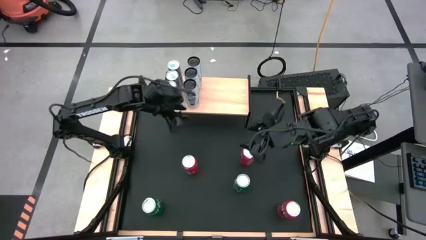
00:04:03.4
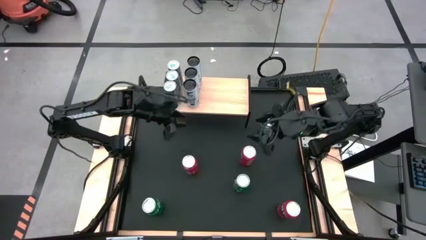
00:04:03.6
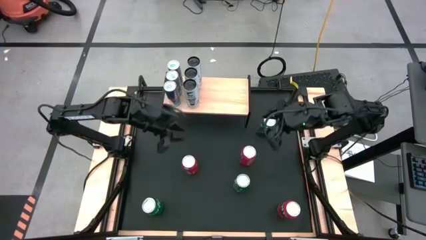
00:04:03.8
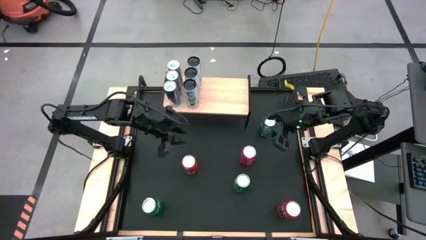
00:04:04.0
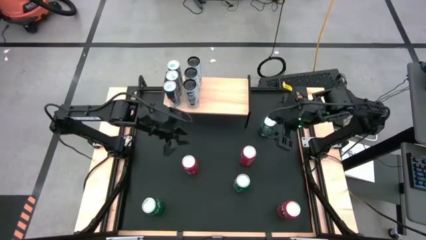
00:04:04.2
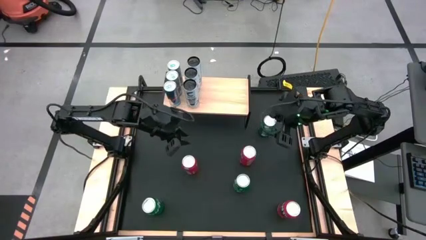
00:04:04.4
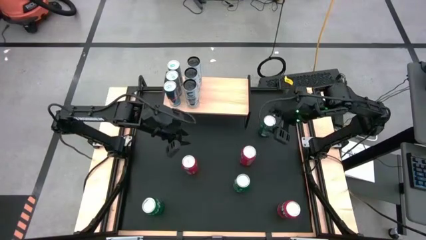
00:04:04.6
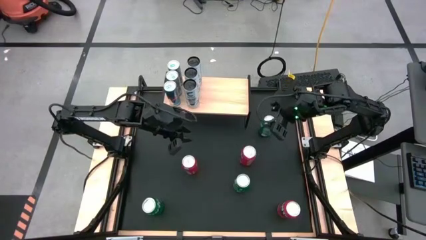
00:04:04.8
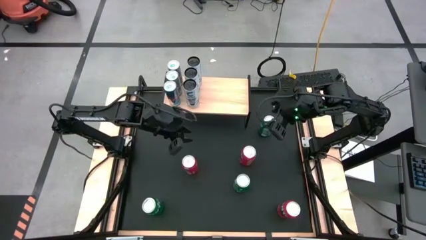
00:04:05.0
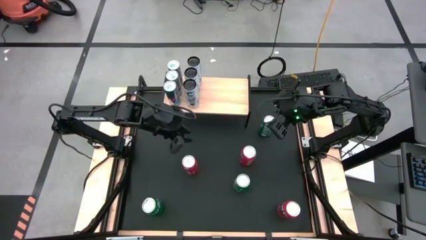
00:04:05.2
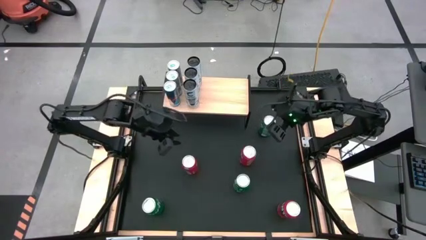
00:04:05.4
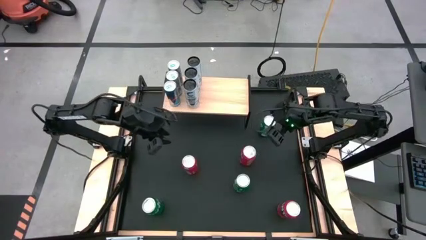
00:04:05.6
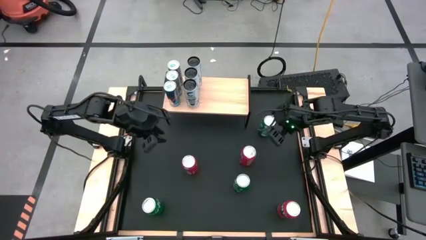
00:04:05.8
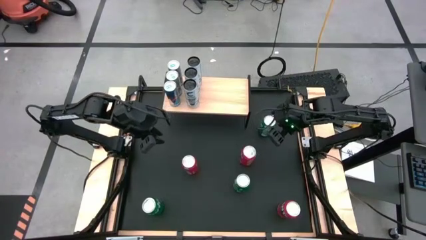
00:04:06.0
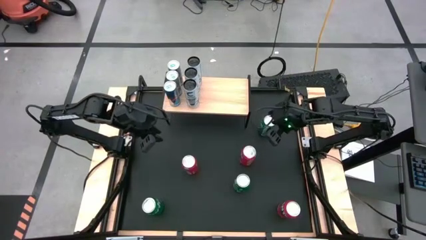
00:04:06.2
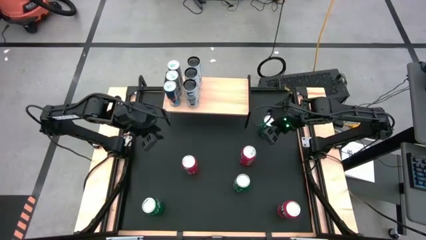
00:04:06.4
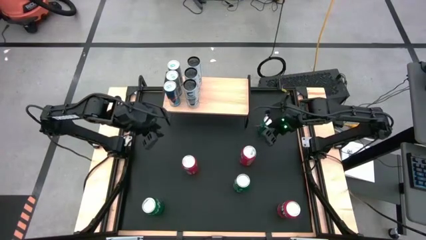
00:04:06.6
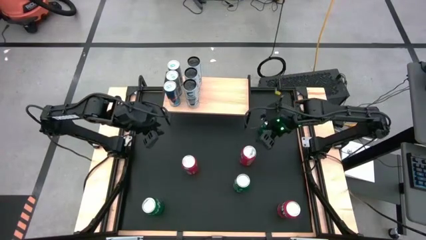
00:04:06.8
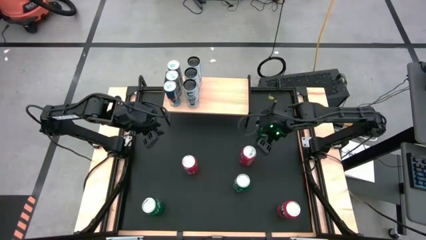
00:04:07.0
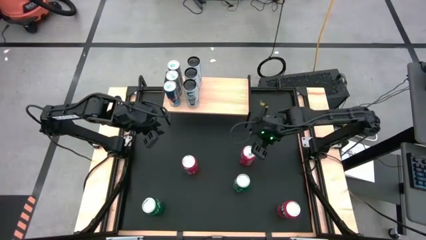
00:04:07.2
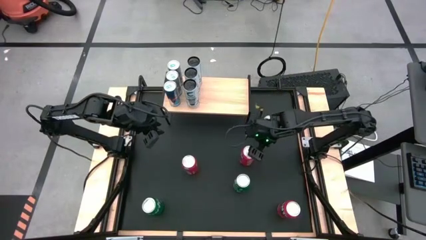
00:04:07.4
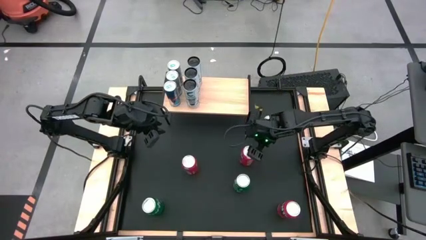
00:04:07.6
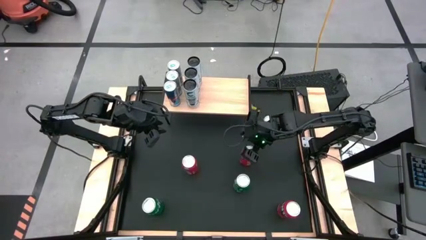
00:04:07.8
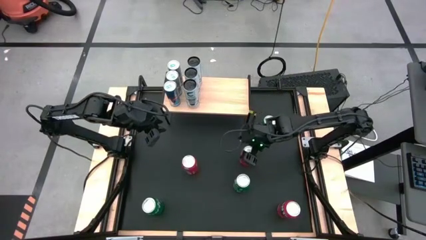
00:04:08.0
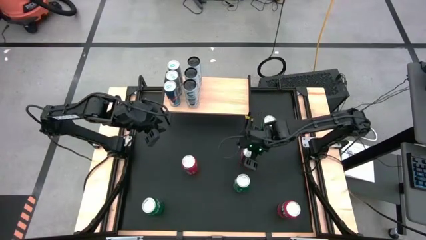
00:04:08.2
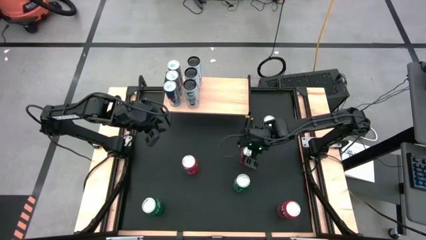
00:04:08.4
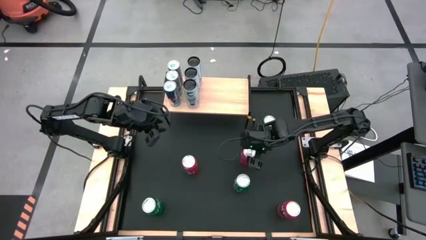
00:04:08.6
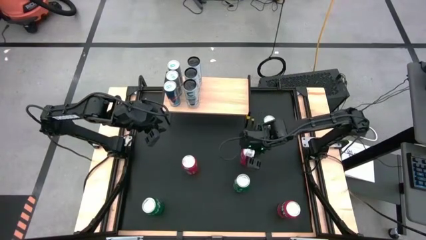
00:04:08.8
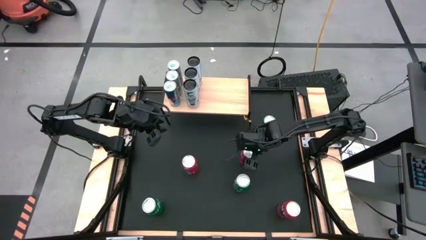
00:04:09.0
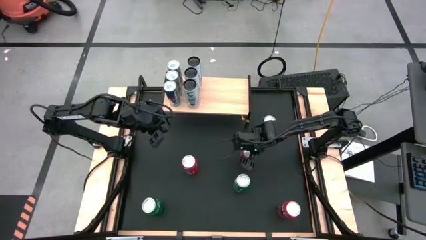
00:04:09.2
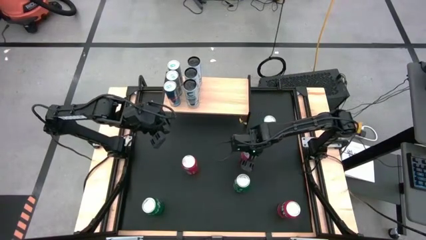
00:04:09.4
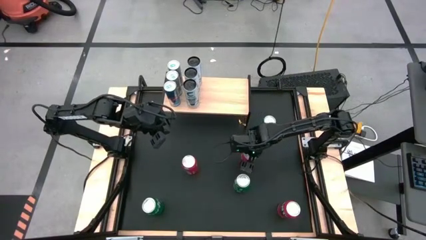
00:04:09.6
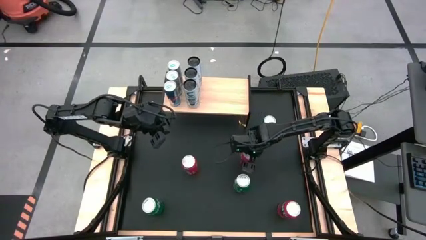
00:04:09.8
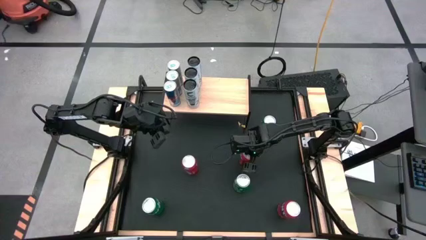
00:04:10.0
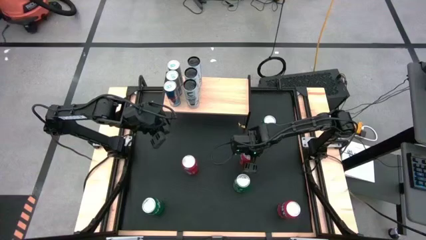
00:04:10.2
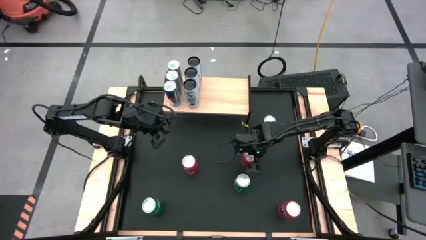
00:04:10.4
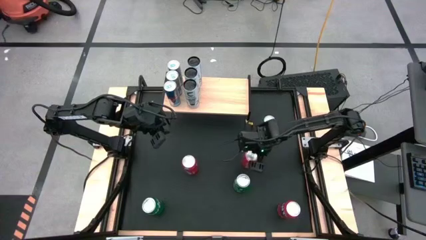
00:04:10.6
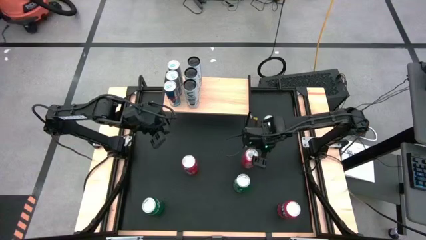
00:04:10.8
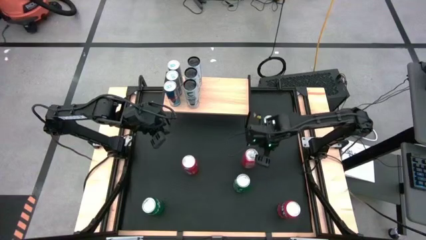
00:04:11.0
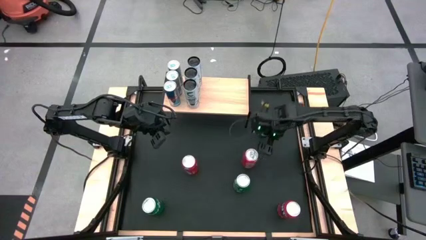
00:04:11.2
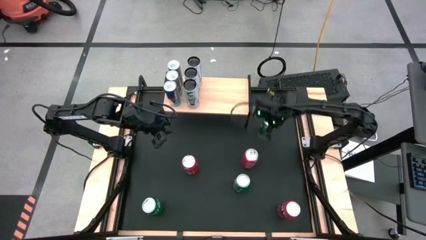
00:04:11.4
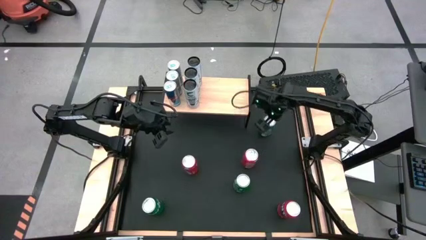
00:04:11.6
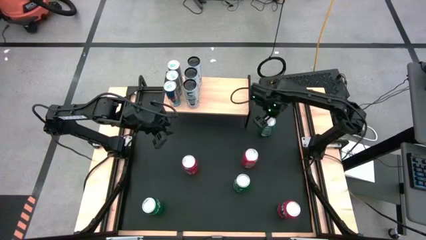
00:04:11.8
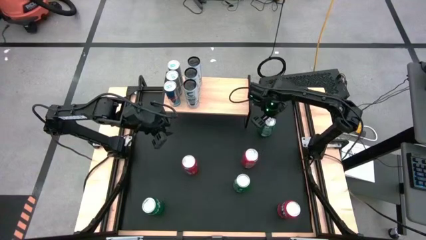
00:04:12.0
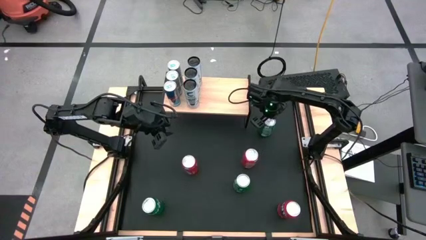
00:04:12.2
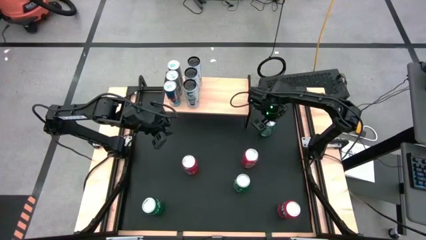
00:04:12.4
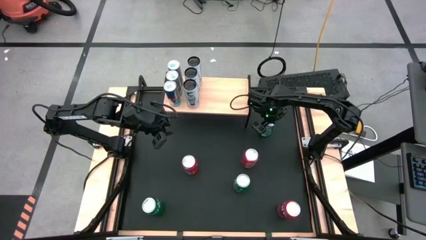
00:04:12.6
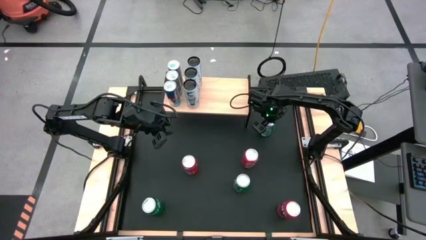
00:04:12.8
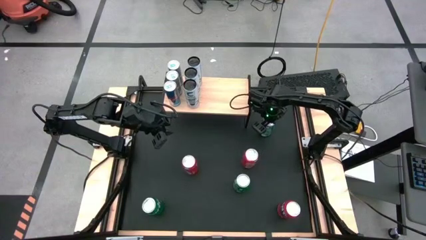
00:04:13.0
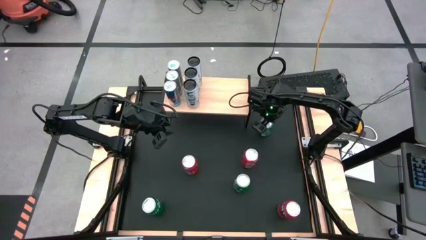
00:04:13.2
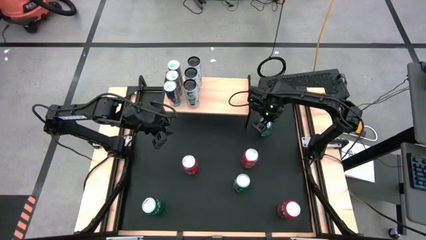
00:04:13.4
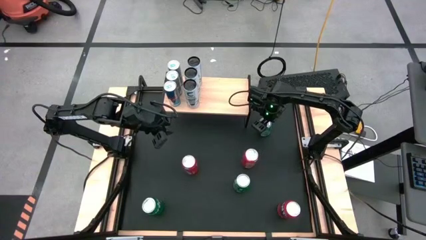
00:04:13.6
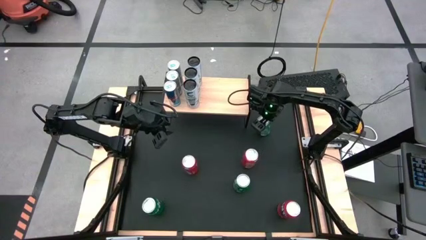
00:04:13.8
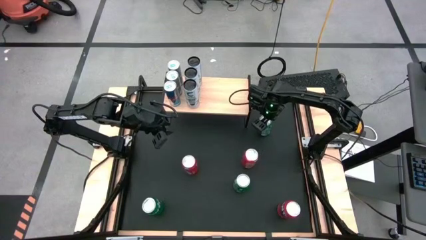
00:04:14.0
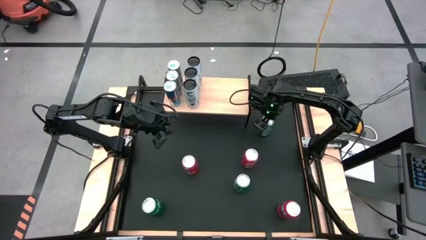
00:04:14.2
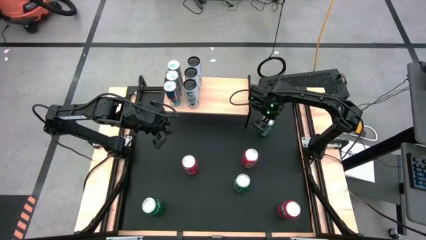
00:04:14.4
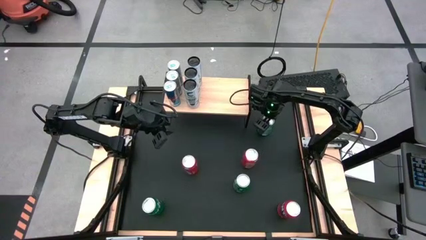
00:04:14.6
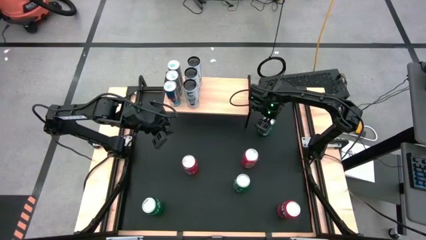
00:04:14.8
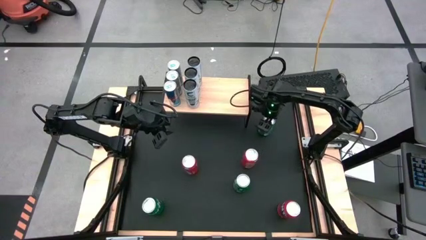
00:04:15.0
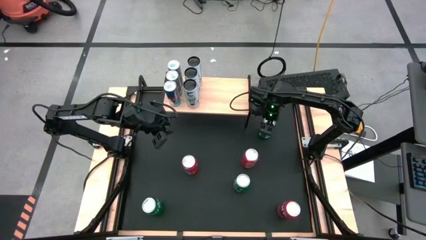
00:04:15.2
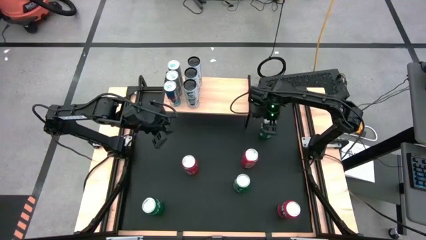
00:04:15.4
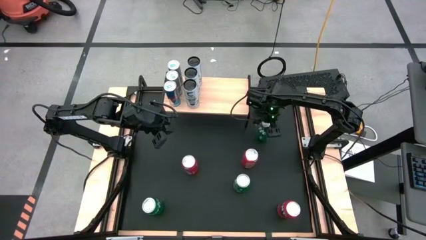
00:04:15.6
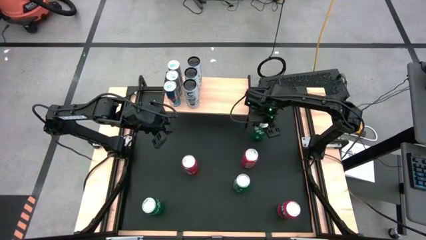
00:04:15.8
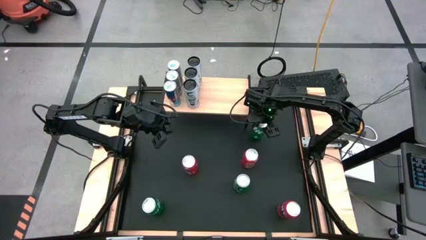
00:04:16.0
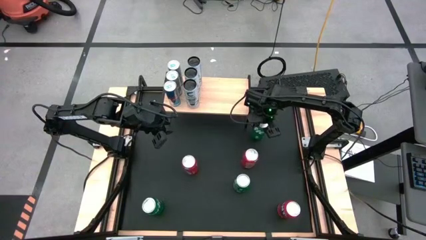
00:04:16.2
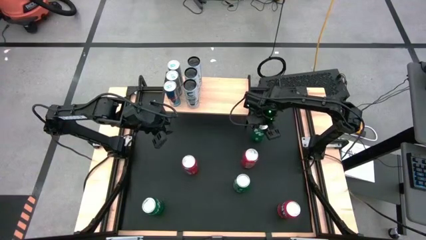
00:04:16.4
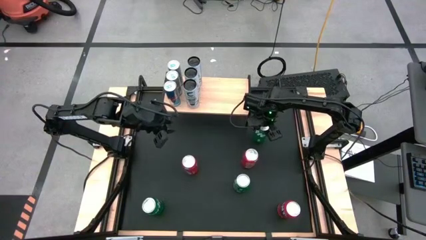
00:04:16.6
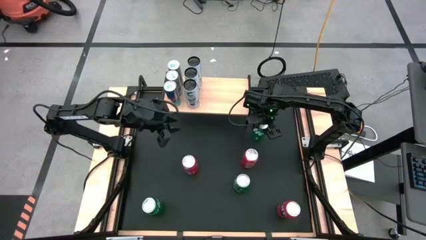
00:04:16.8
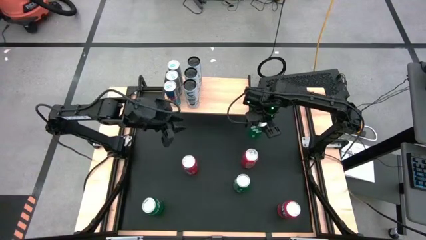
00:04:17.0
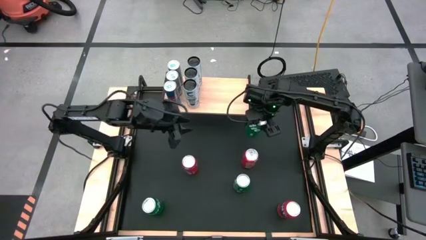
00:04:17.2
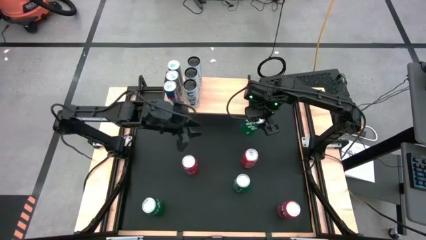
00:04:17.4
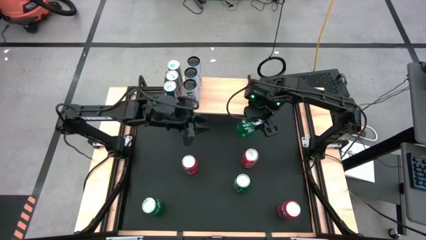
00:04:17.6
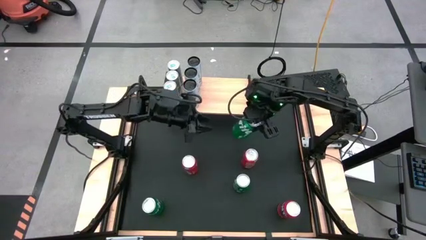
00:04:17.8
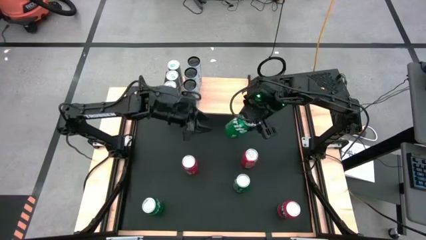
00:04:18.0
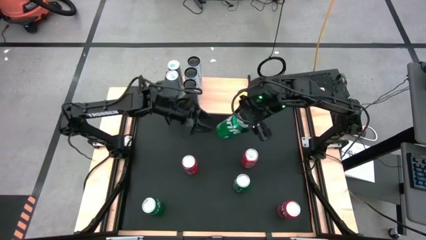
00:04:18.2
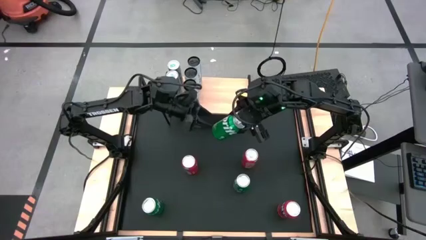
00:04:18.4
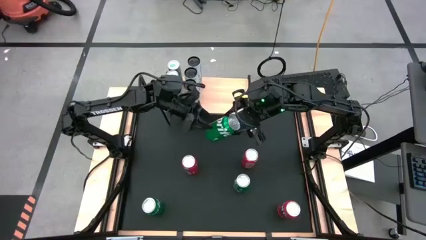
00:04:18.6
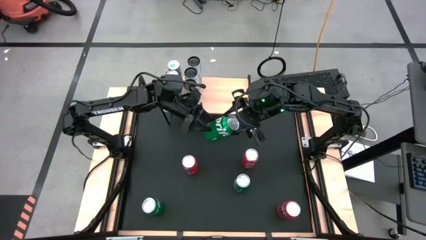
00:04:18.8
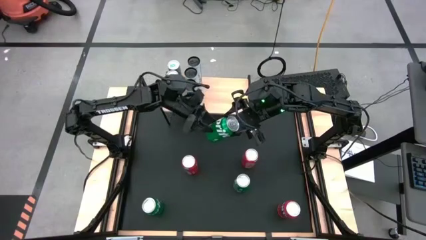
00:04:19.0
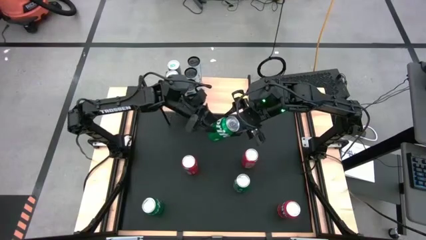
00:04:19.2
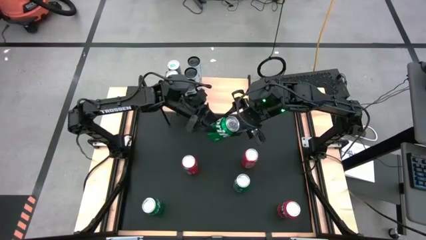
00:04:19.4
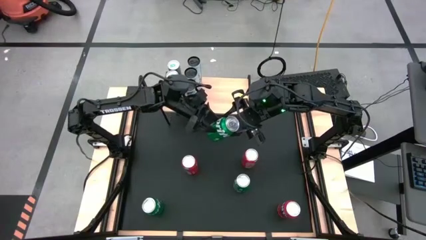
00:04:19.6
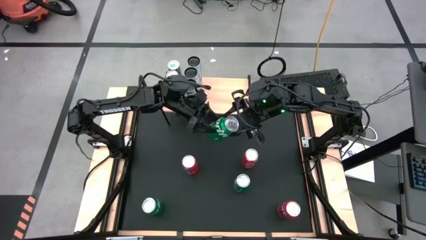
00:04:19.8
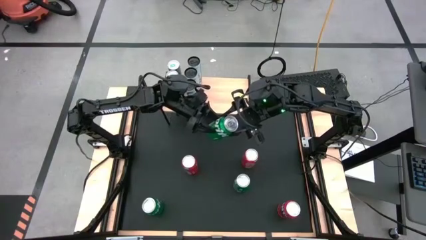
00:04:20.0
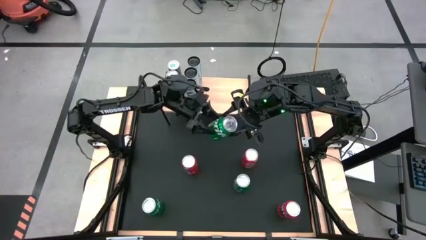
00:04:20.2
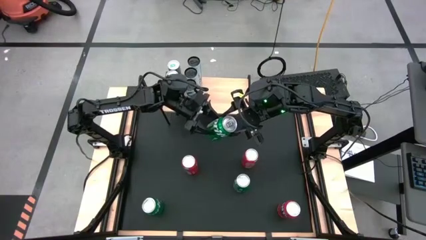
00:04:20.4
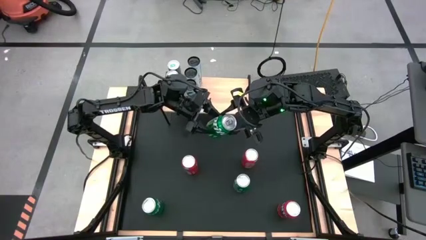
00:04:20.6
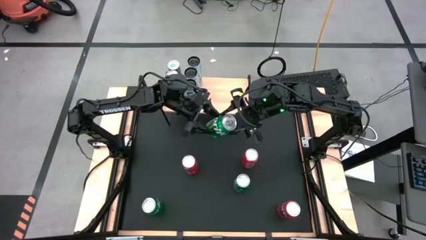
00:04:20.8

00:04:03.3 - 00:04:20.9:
Task: Place canned beverage on shelf
Put the top green soda can on the shelf
